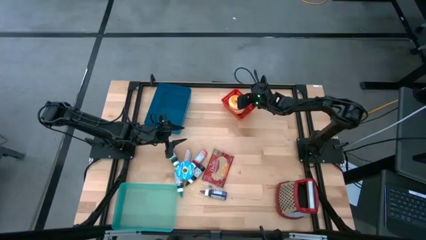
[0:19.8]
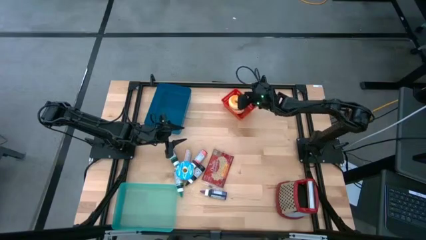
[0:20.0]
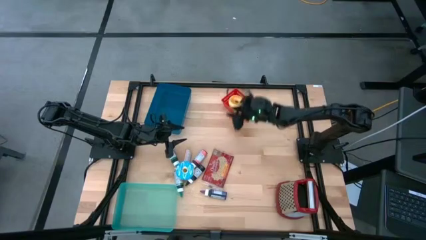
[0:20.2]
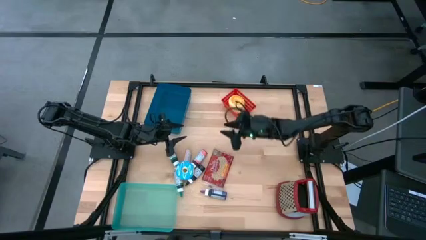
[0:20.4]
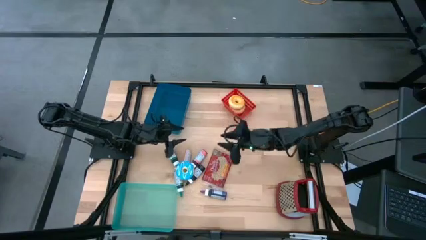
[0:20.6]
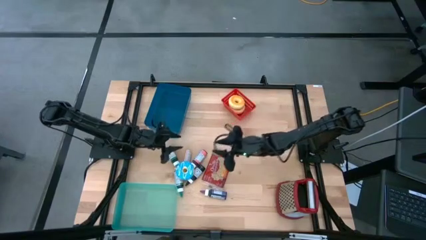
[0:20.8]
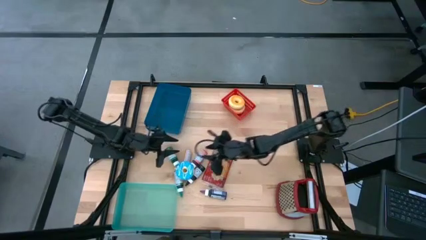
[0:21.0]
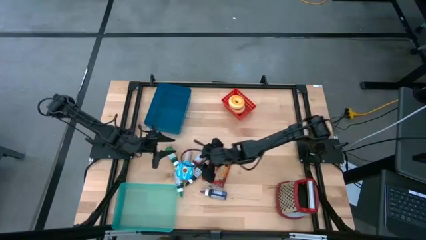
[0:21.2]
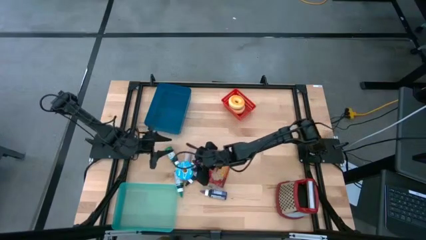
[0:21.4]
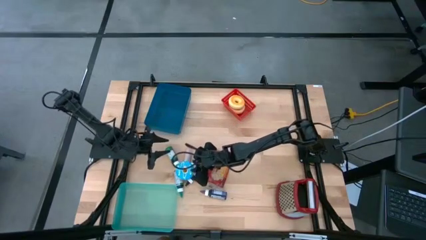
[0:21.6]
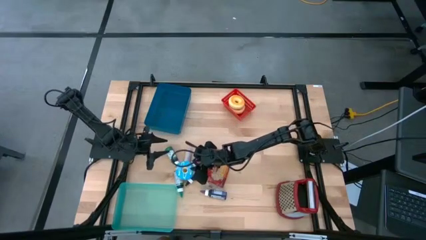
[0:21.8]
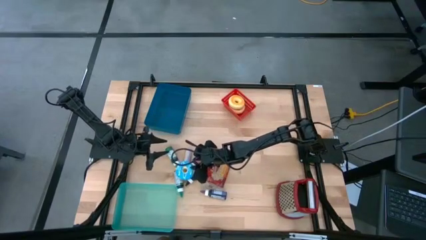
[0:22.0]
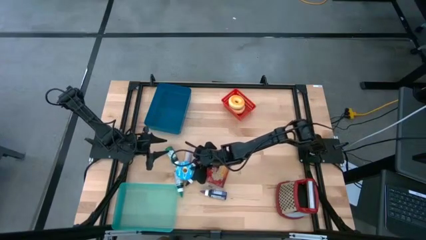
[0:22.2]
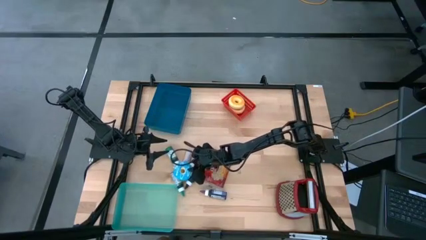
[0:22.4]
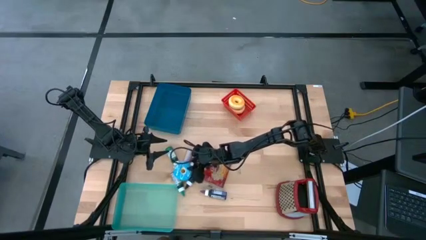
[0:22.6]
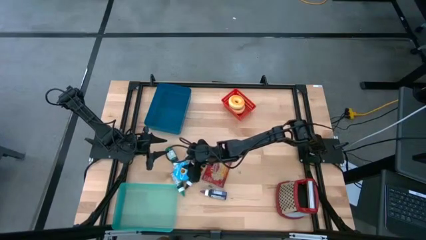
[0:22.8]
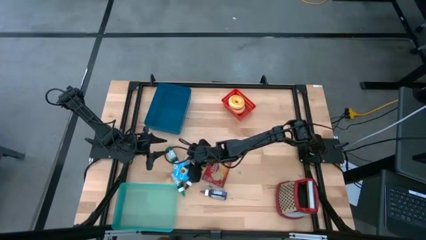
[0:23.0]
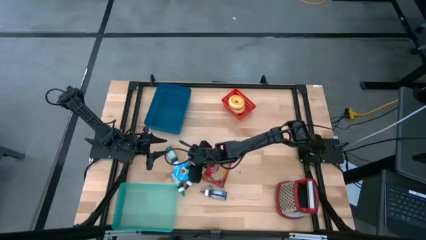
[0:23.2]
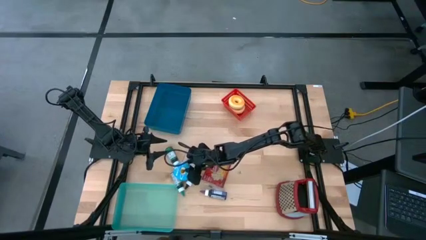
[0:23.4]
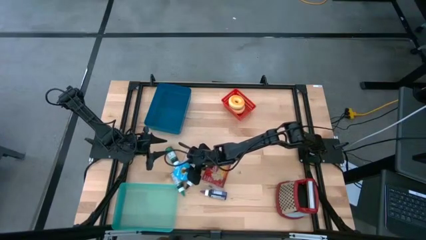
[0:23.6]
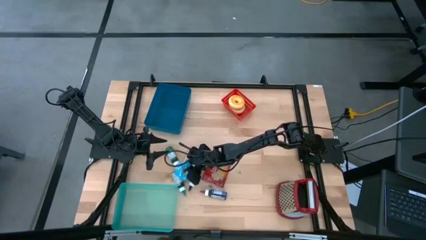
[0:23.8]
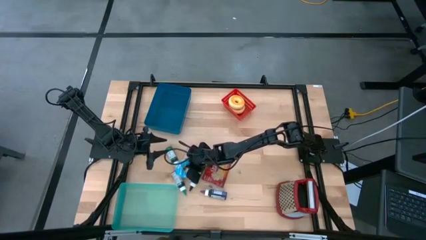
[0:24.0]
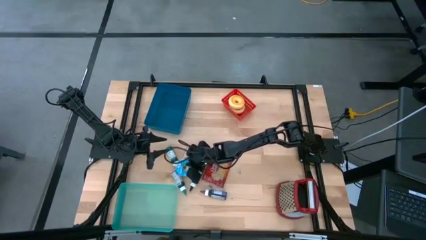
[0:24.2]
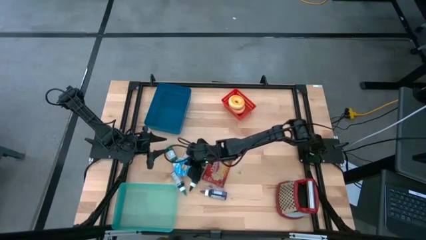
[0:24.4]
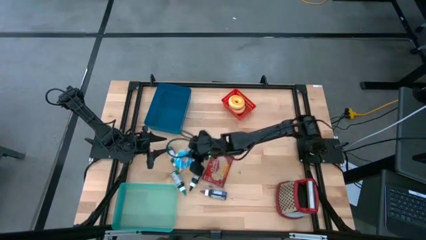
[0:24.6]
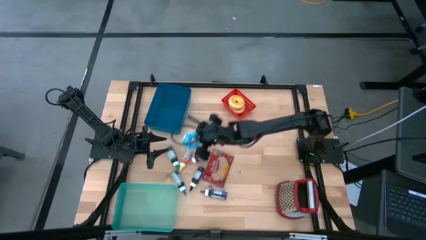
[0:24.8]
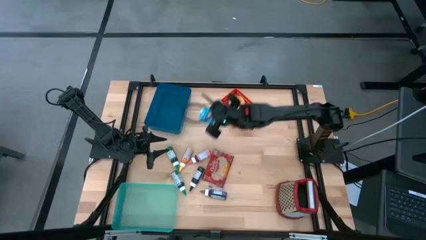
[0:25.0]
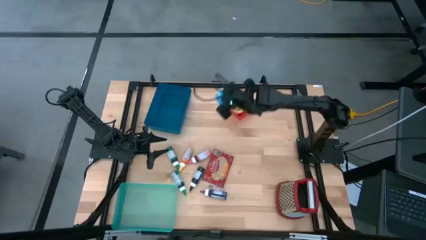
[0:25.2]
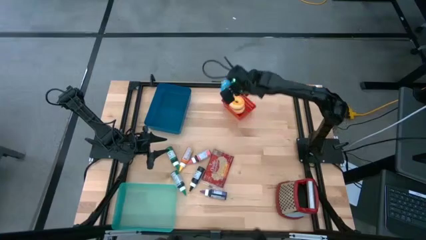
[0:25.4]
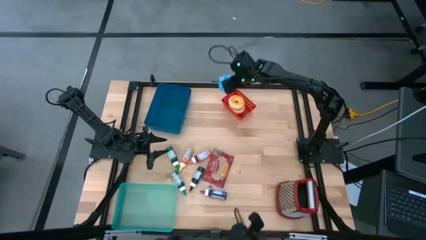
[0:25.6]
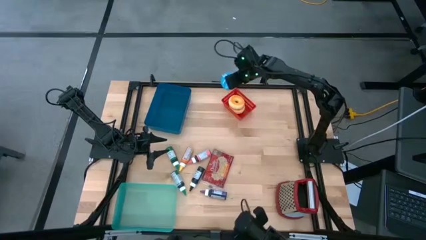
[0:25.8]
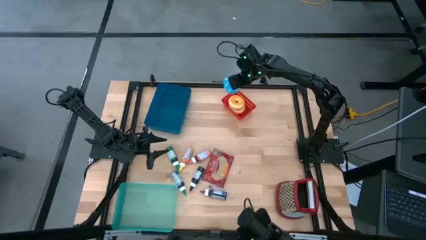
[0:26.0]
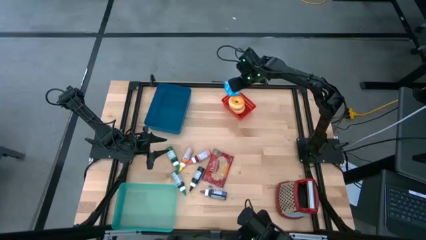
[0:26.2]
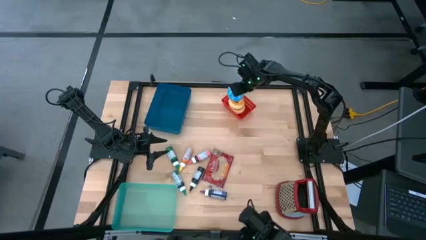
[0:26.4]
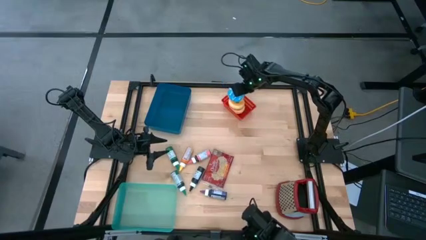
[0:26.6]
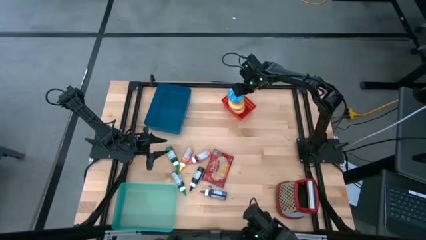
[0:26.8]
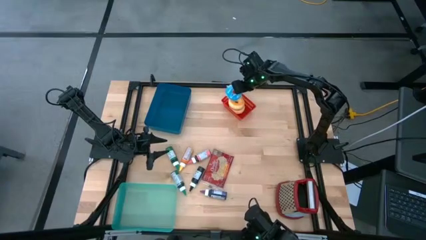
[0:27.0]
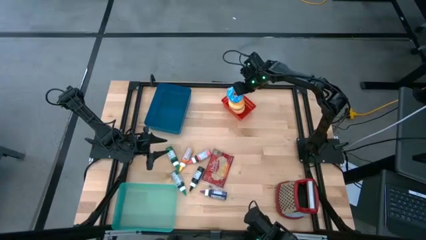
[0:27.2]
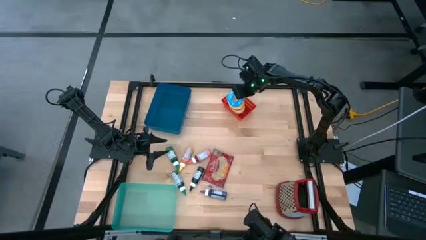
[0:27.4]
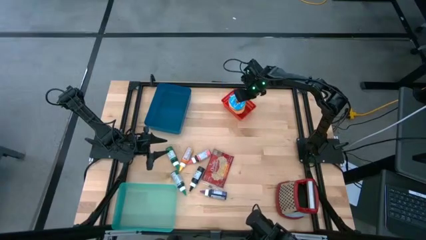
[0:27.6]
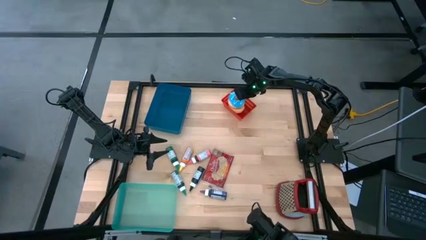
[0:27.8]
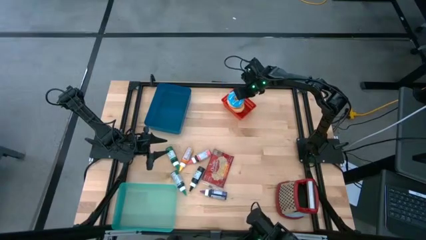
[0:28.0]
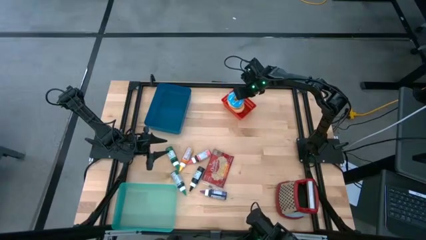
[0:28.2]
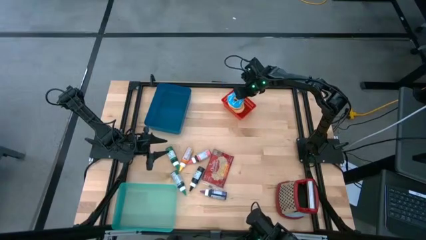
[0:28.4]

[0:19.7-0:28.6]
Put the blue donut into the red bin

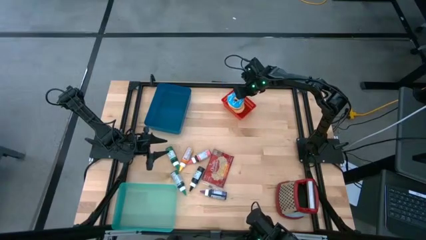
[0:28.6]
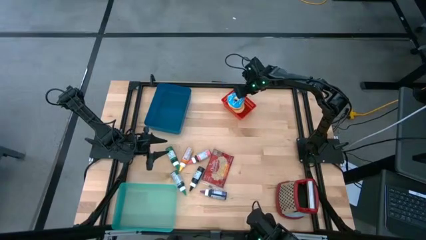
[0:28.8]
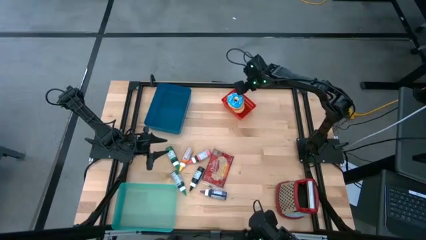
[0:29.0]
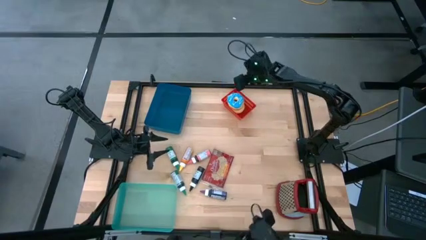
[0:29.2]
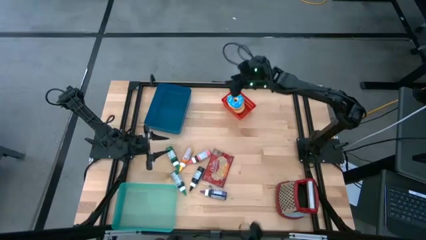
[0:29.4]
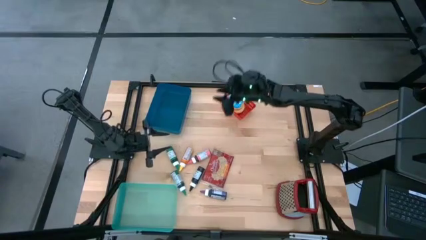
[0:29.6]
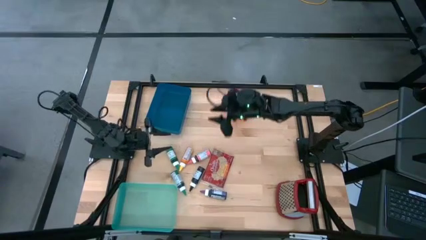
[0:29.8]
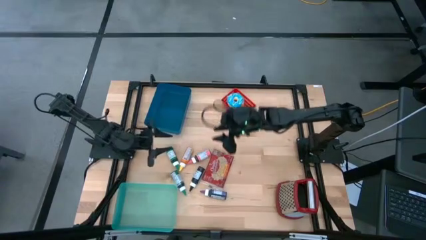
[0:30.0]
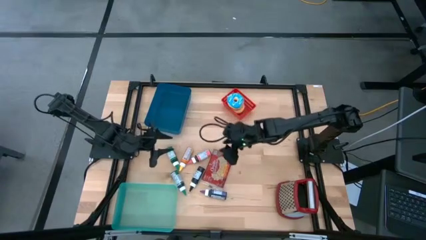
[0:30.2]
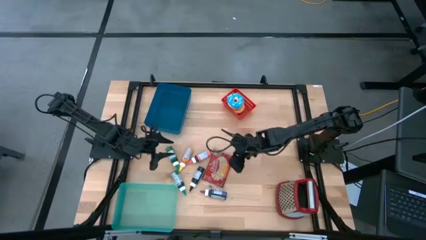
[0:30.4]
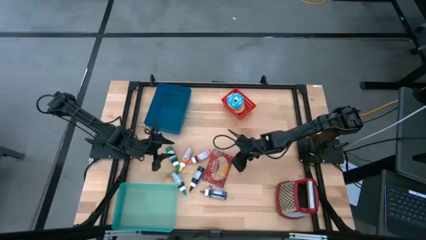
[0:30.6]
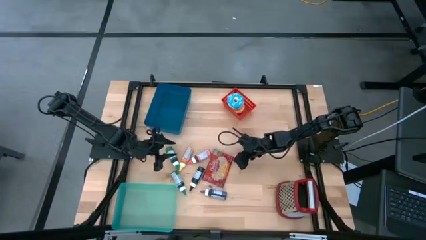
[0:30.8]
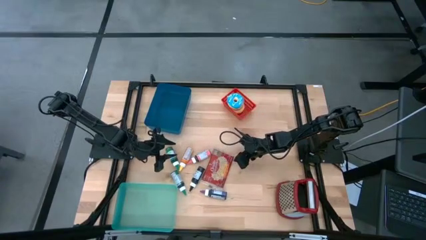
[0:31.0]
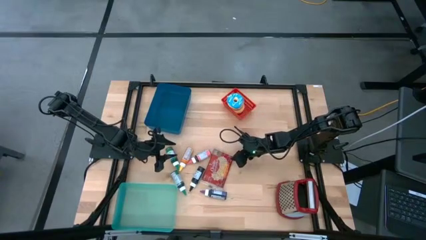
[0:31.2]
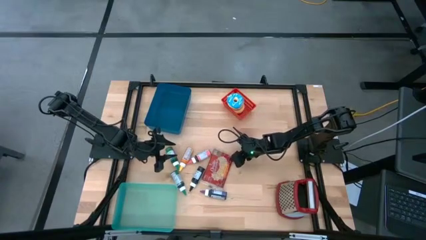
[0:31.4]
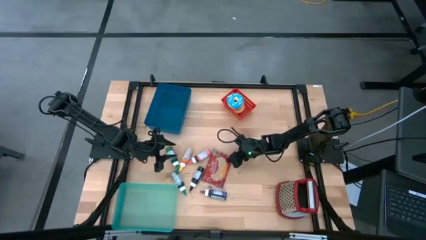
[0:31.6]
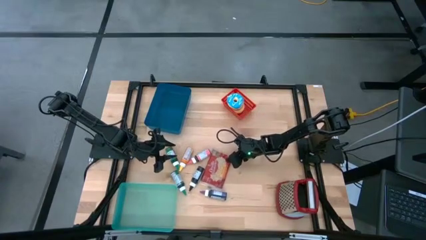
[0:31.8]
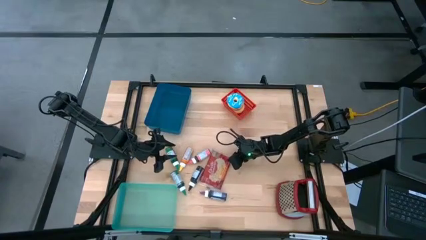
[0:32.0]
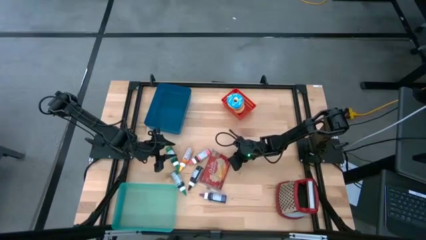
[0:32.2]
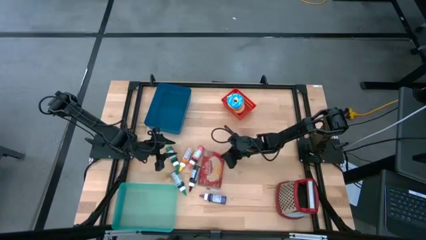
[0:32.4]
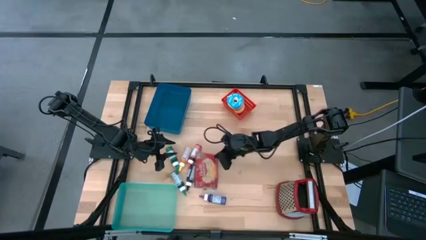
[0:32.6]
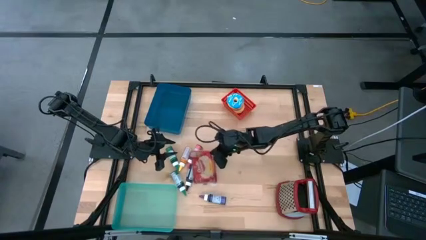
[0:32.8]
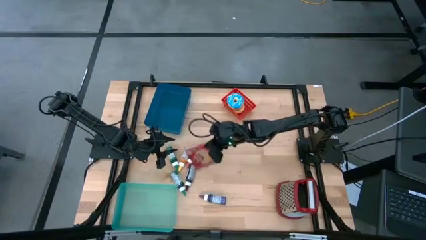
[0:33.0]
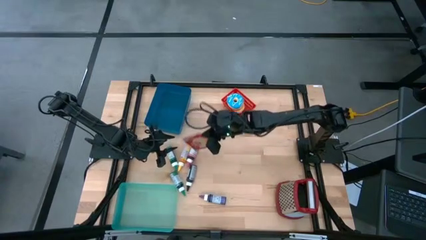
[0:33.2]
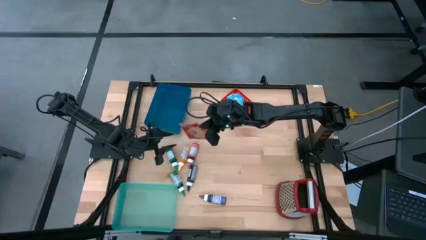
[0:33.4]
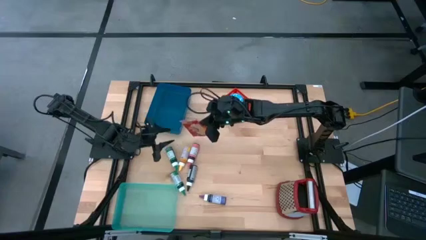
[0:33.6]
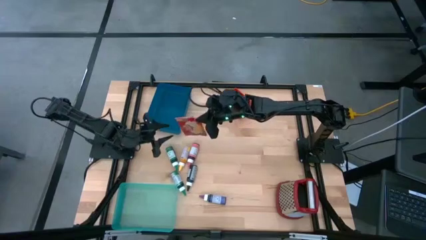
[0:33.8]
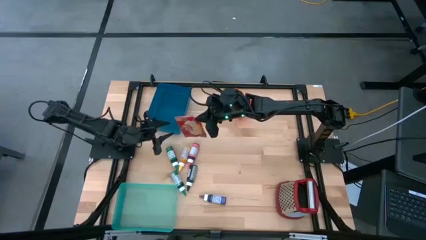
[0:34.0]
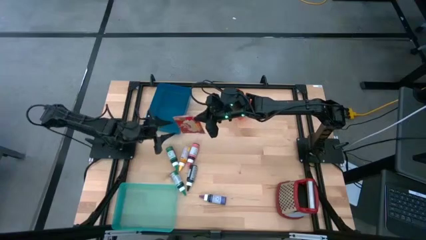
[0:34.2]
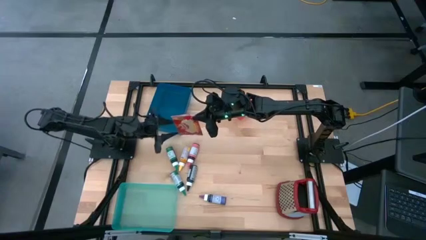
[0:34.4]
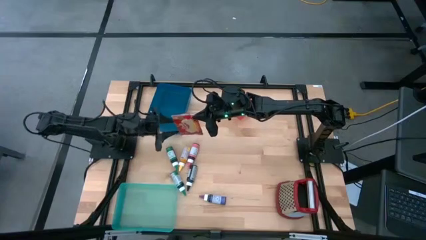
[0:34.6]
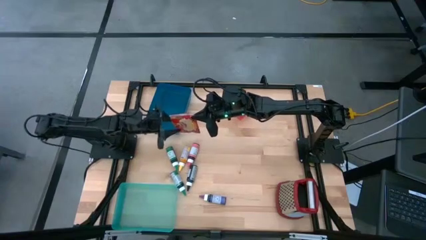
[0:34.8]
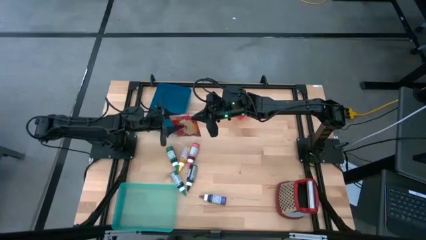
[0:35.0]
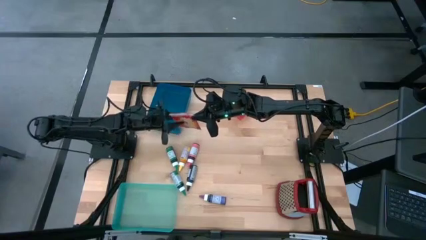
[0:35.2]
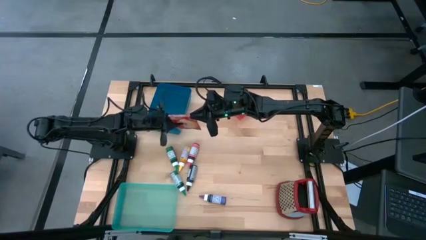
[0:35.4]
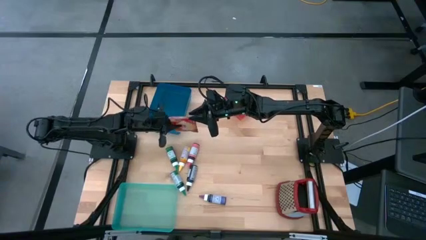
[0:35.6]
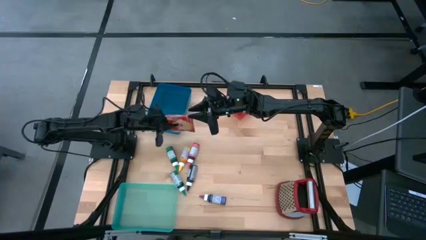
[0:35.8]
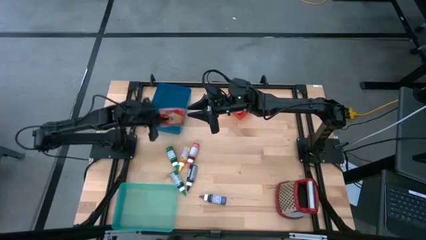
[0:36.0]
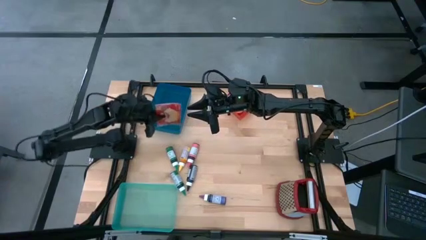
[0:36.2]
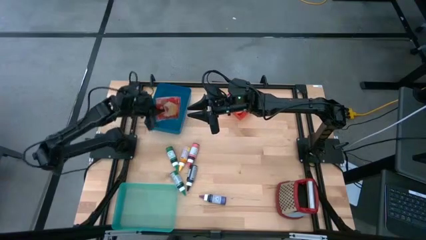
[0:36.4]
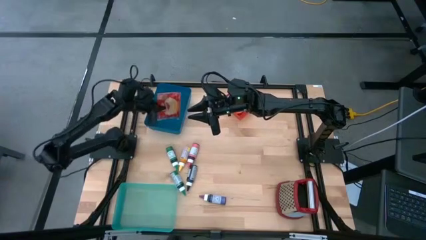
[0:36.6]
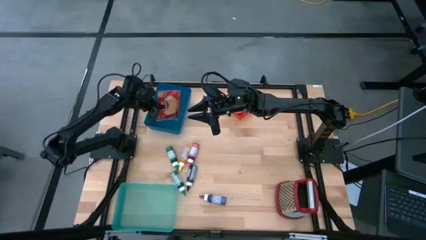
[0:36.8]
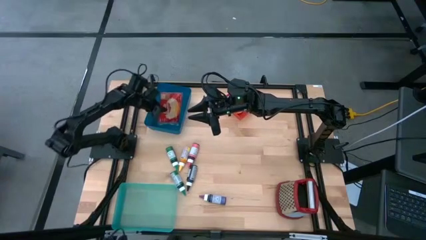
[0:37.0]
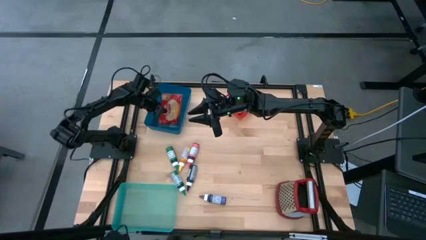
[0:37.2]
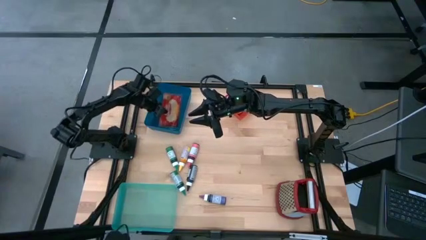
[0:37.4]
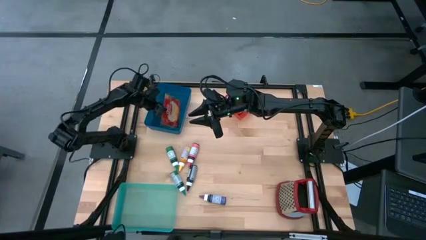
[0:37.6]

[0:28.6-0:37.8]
Put the red popcorn bag into the blue bin
